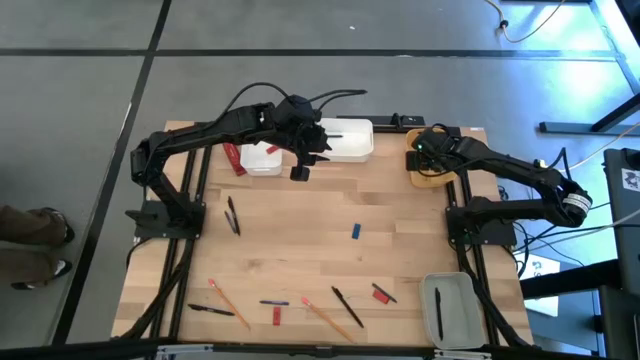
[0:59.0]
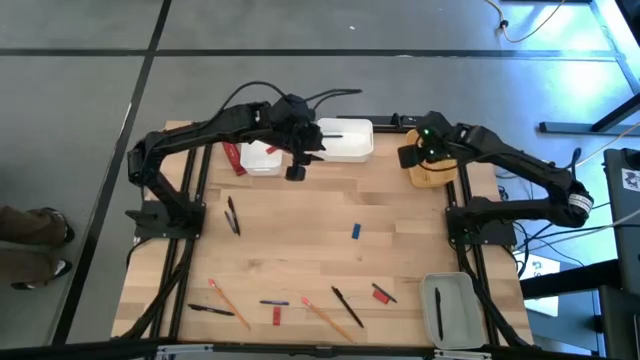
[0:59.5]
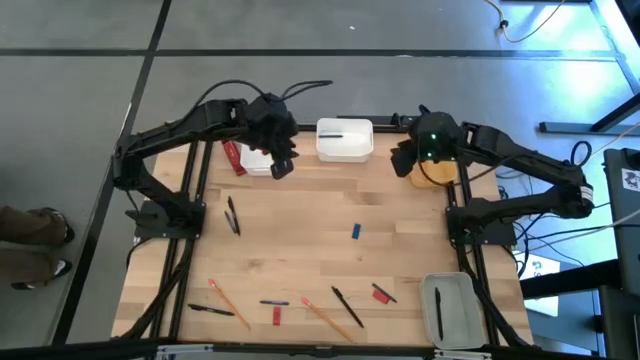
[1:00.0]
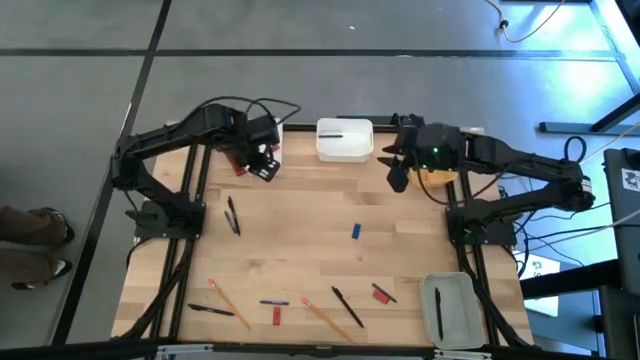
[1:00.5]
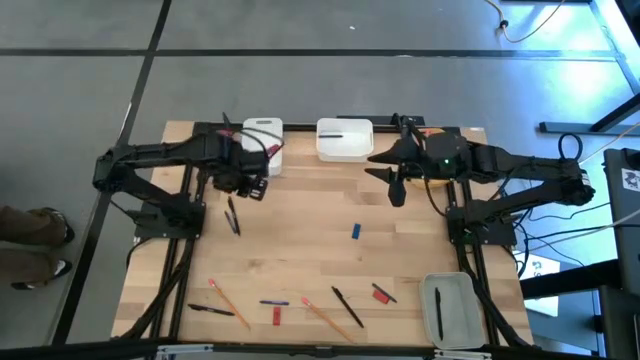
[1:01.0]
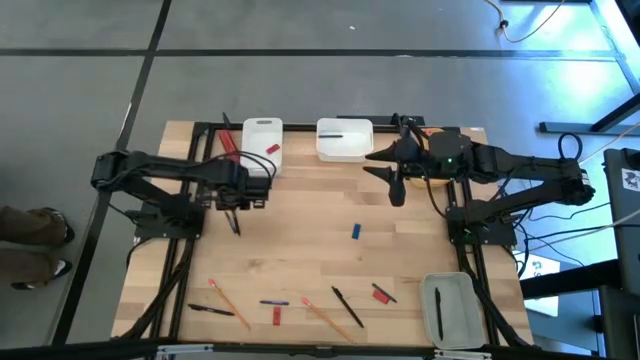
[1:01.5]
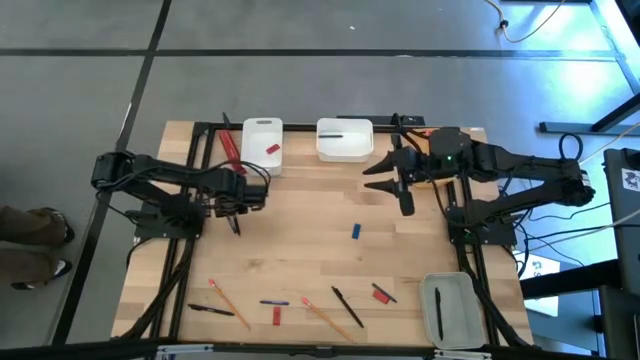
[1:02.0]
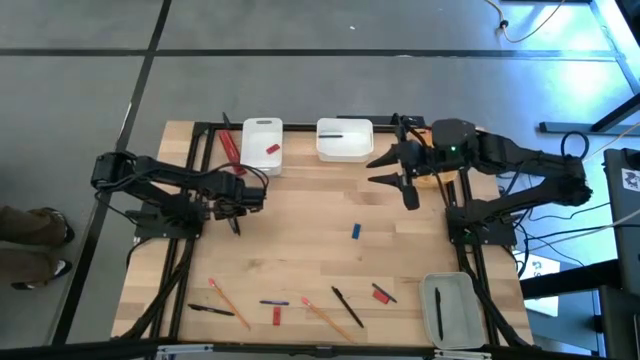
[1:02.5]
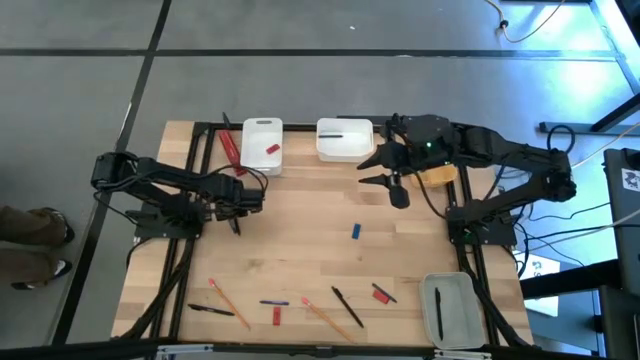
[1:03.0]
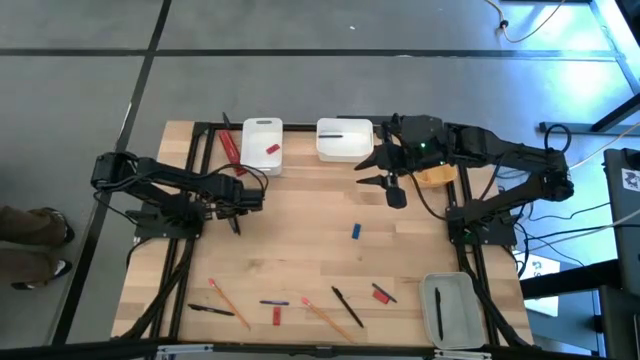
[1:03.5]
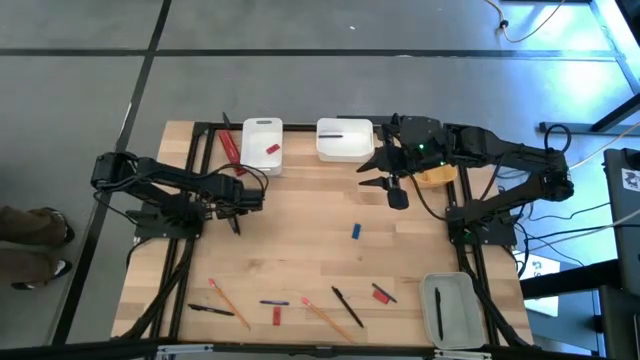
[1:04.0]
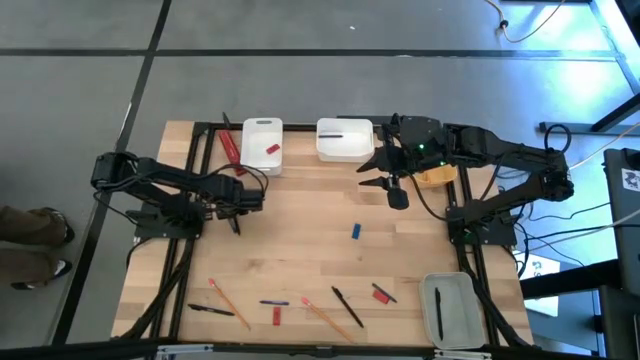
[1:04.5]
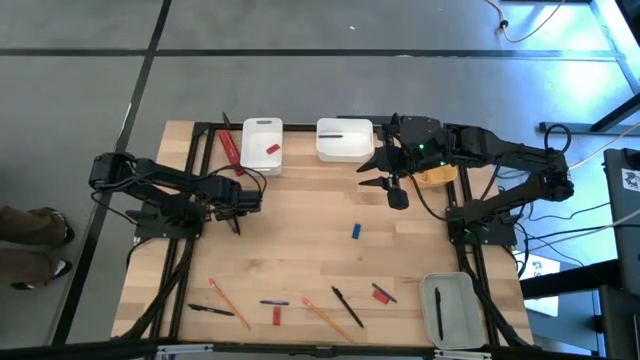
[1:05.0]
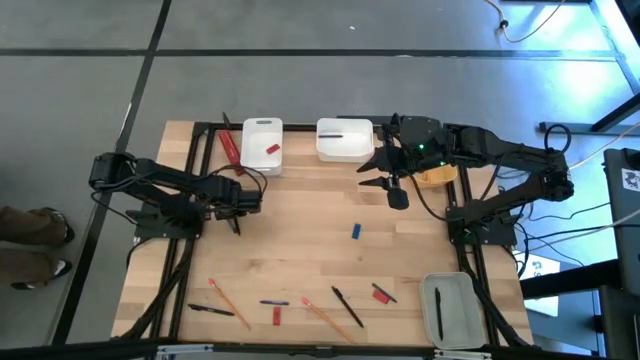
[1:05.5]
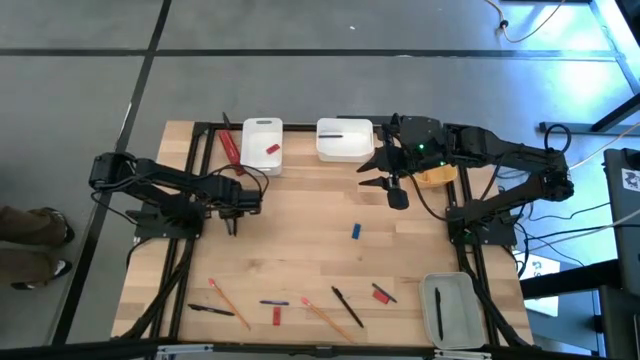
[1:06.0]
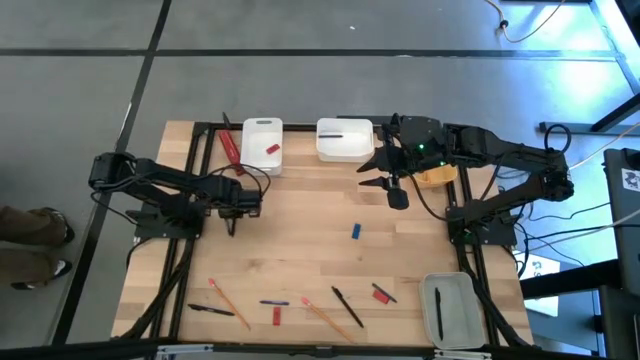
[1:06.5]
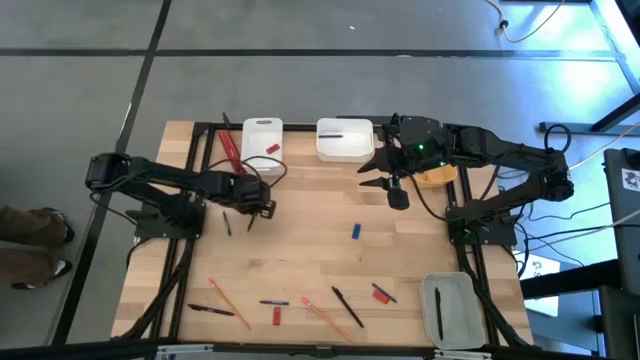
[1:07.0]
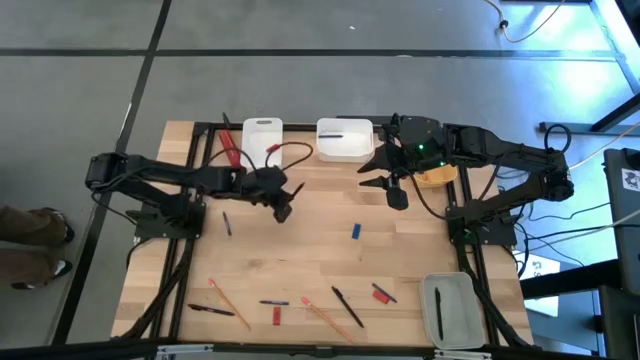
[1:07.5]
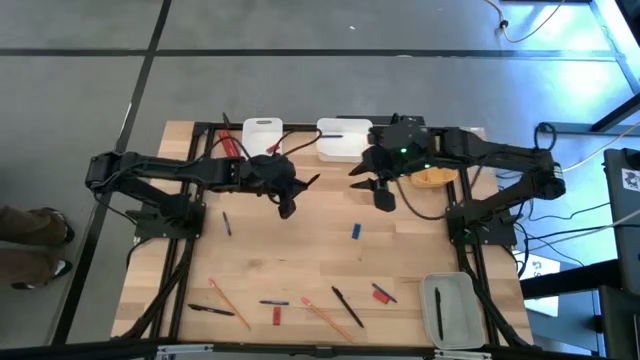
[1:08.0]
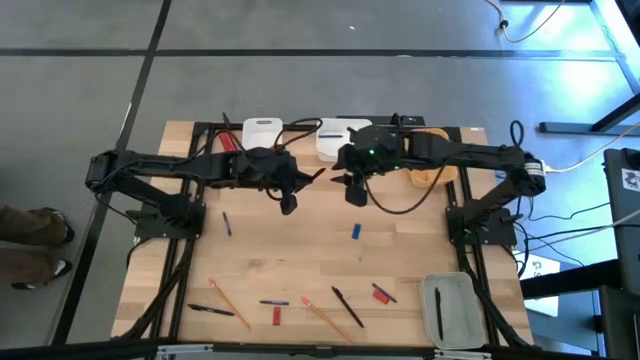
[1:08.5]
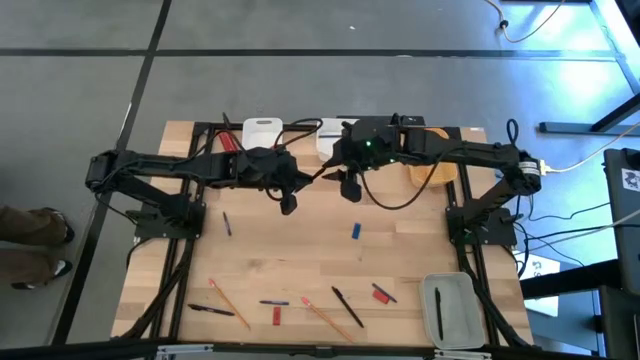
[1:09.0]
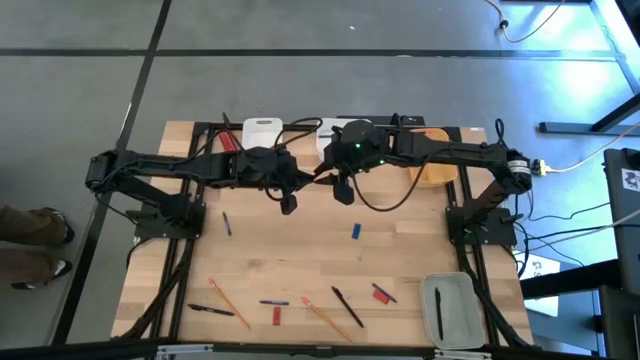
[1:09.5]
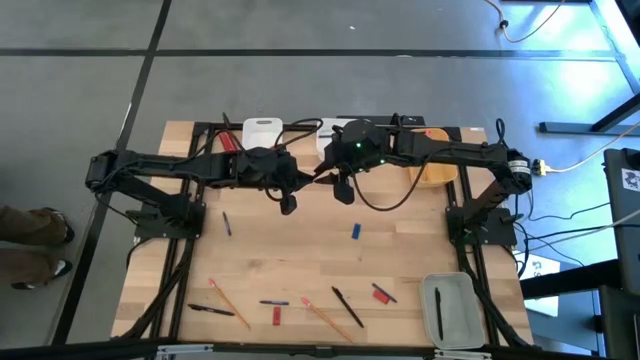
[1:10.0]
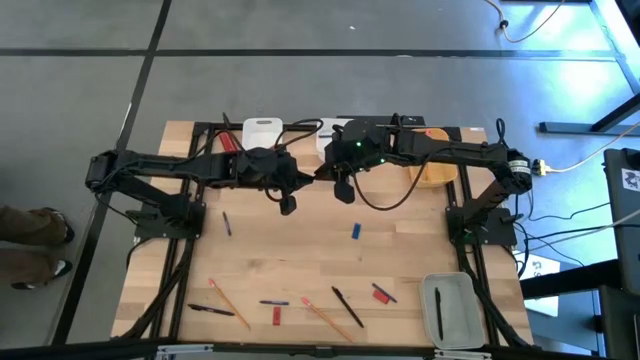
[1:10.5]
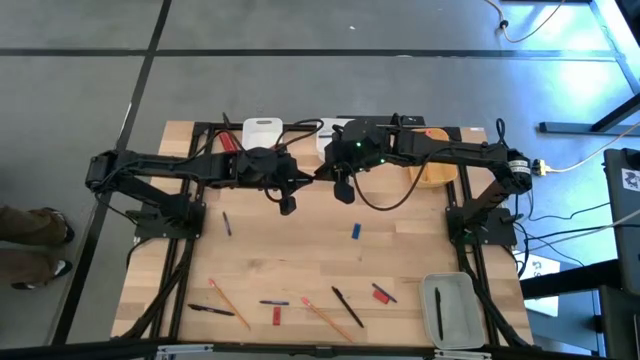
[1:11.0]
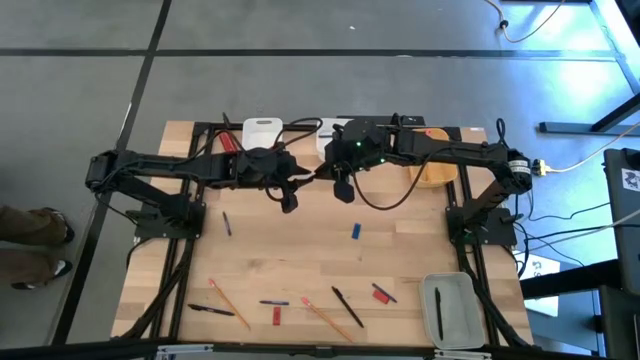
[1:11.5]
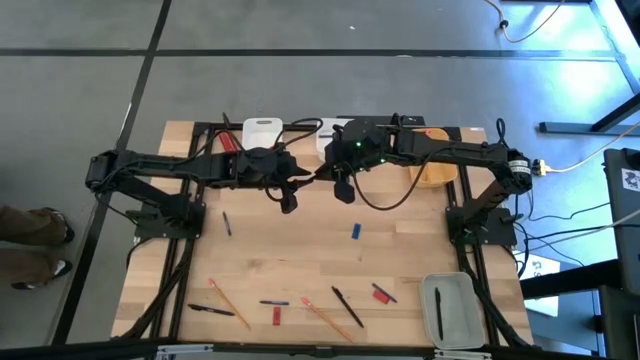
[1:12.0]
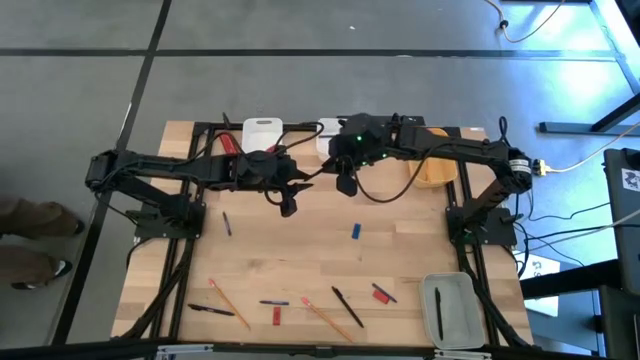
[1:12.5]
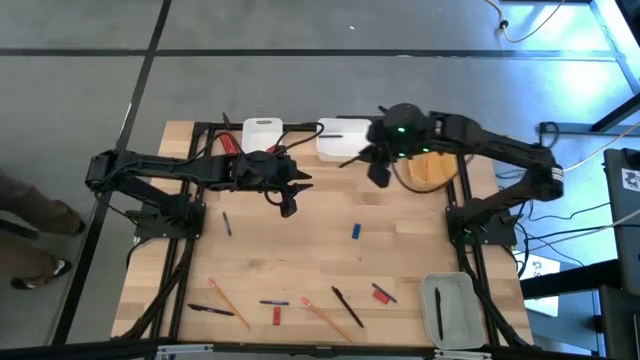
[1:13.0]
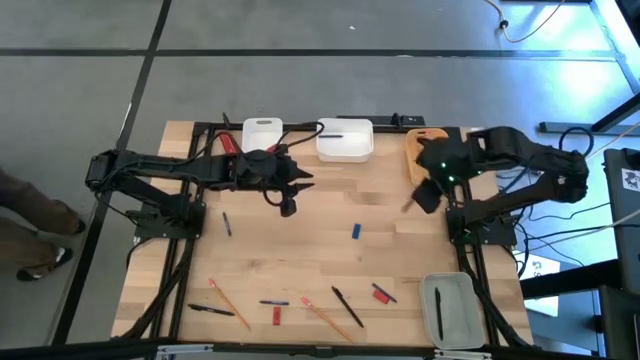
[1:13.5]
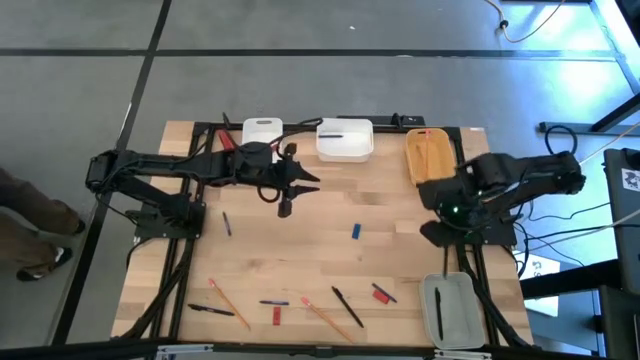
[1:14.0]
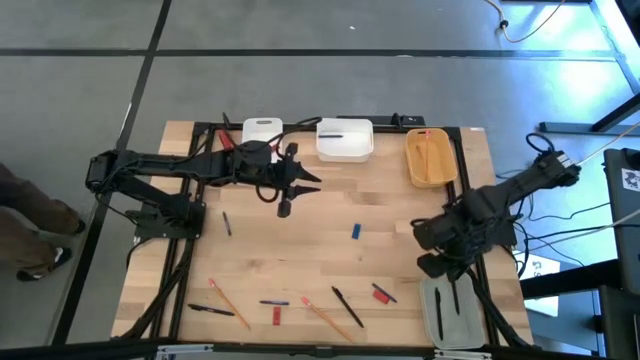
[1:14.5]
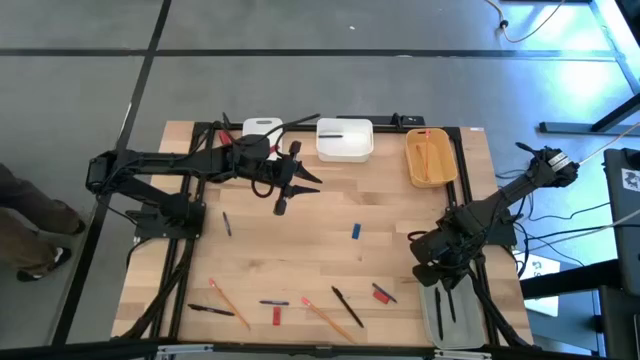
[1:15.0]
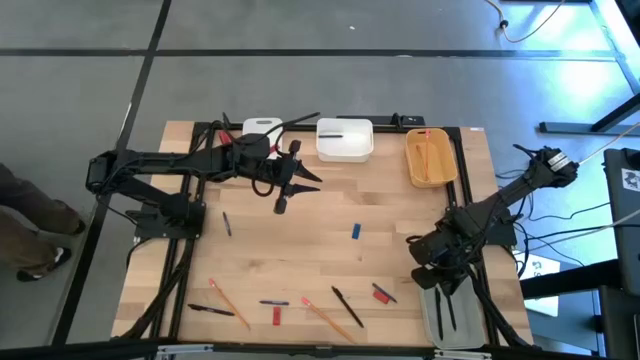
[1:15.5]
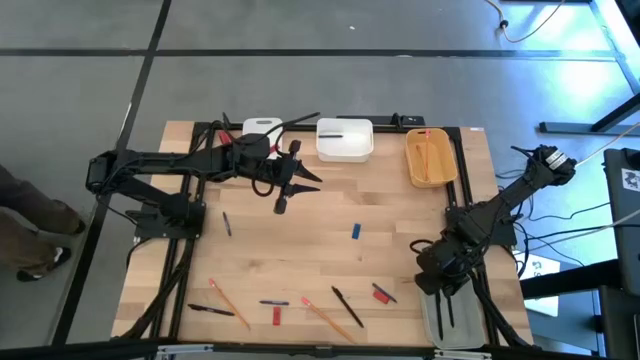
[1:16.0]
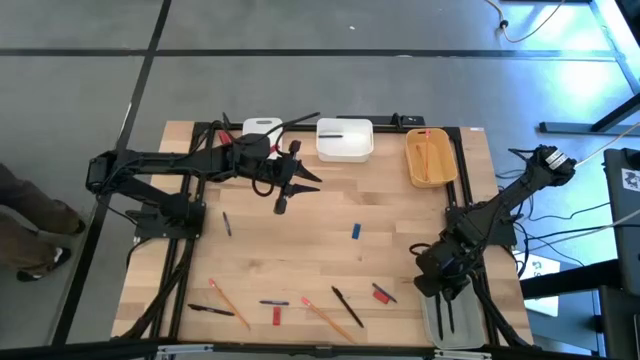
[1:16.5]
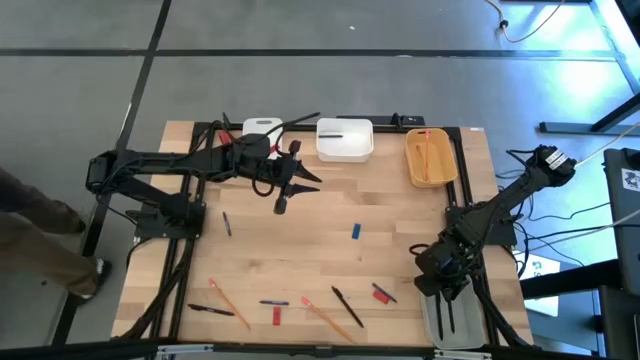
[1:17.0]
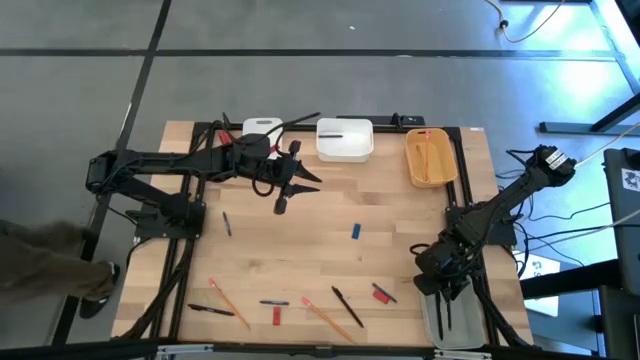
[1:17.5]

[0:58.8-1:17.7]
Task: Sort crayons/erasers/pens/pencils in bins
Put the black pen into the gray bin
